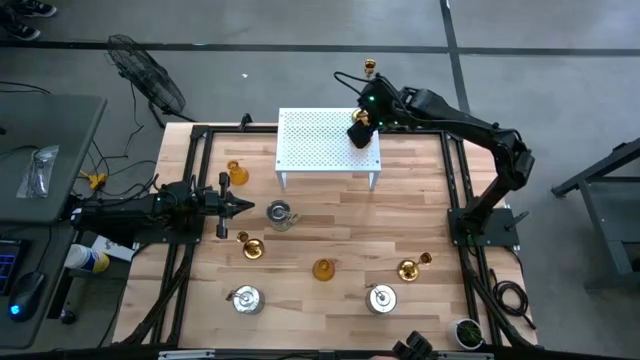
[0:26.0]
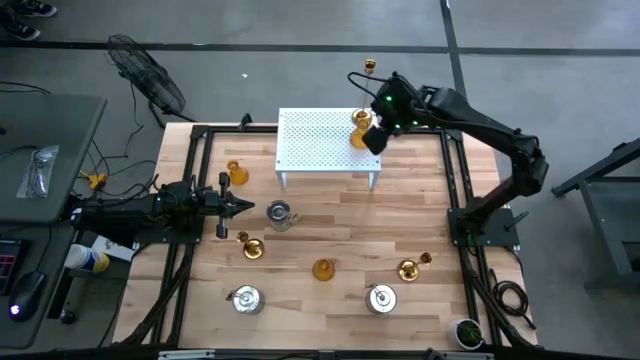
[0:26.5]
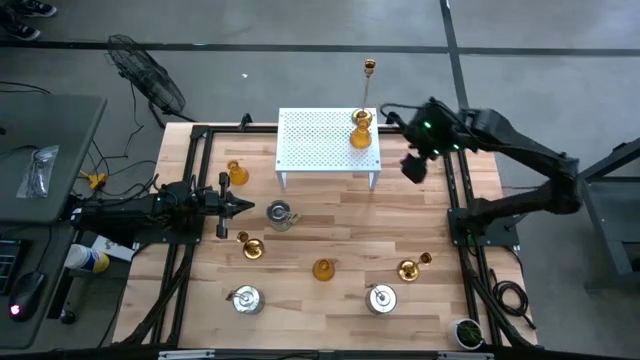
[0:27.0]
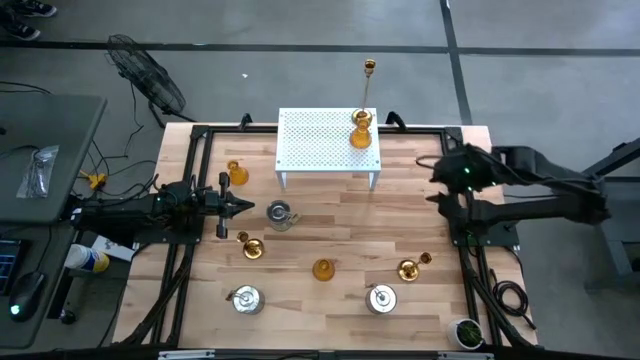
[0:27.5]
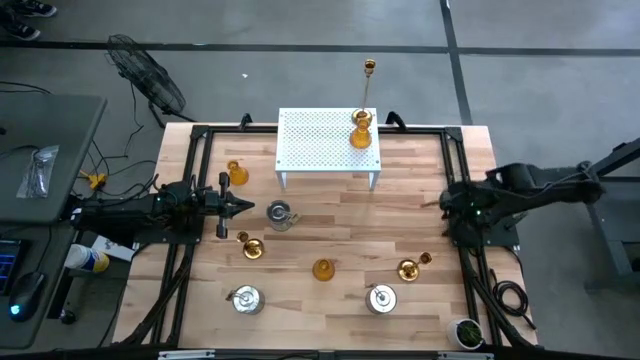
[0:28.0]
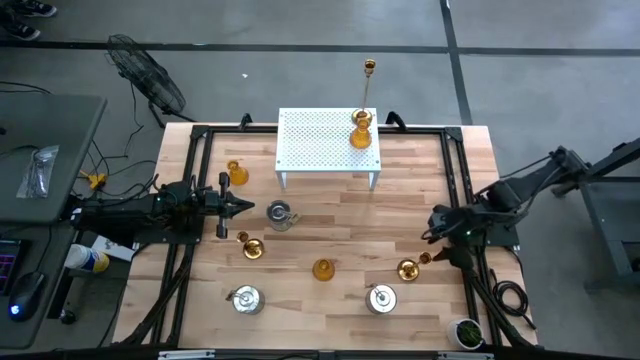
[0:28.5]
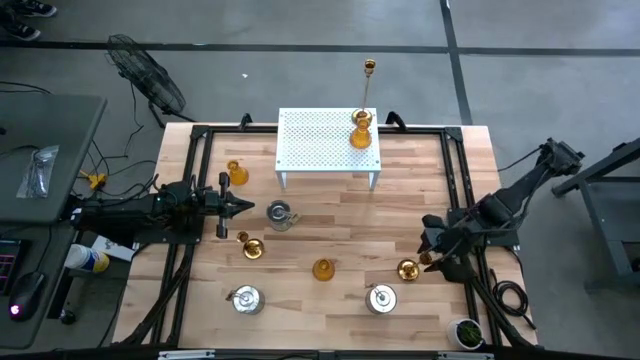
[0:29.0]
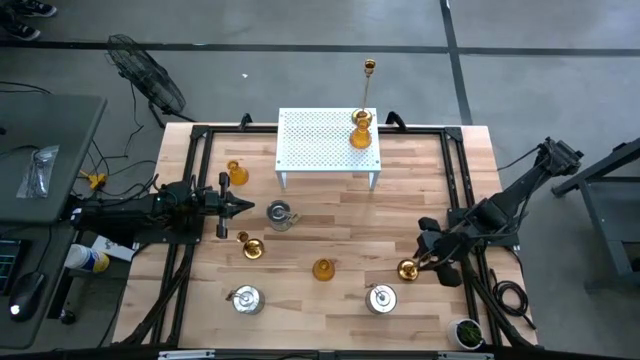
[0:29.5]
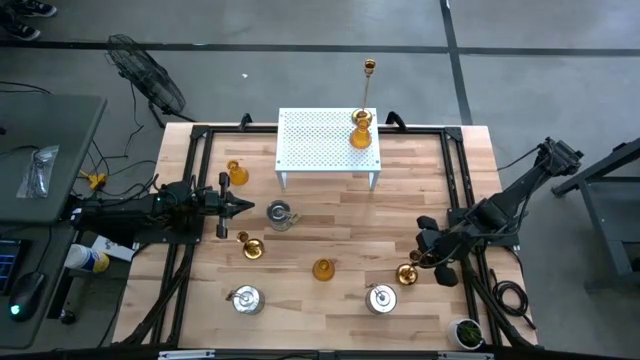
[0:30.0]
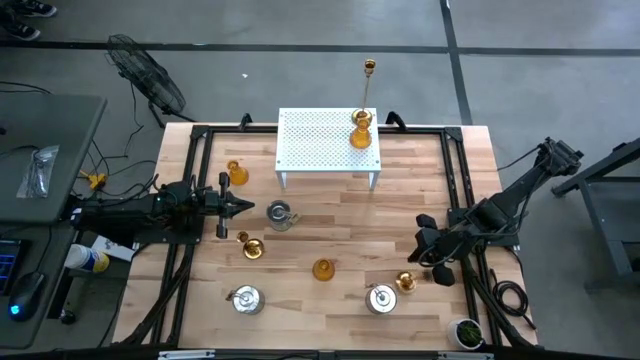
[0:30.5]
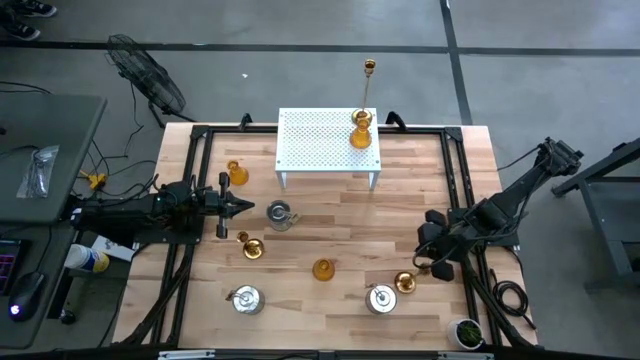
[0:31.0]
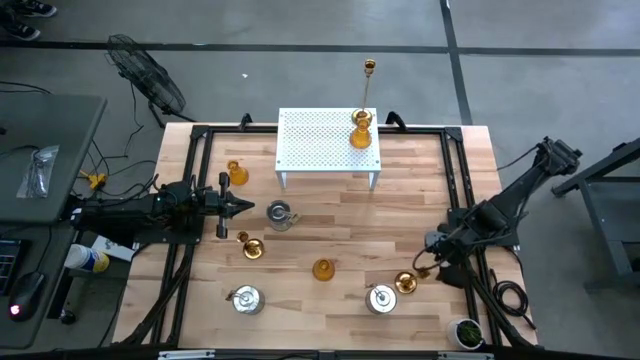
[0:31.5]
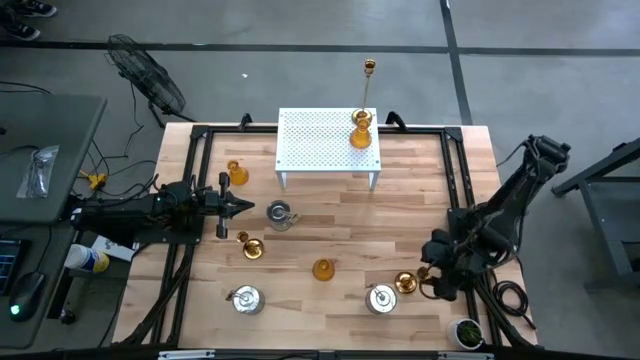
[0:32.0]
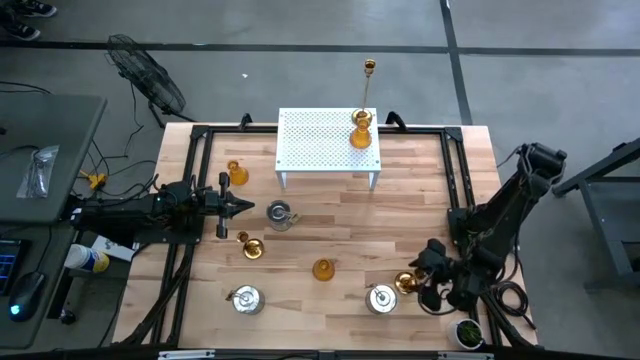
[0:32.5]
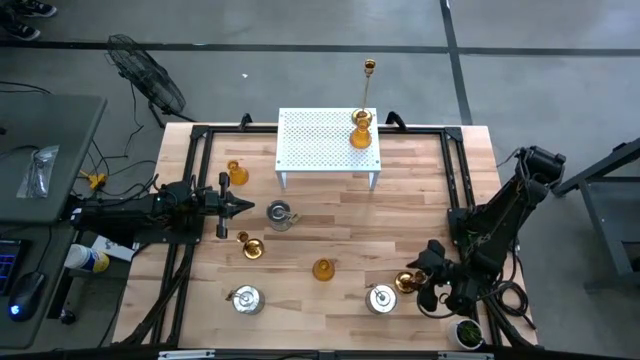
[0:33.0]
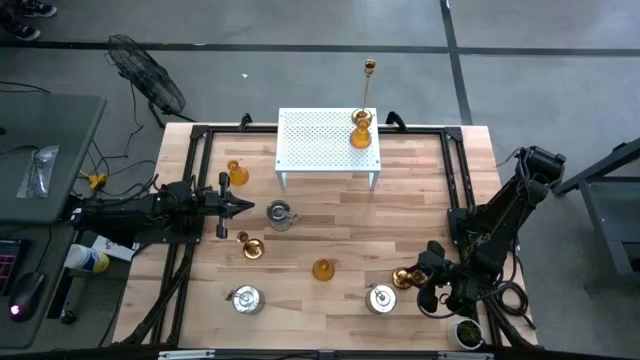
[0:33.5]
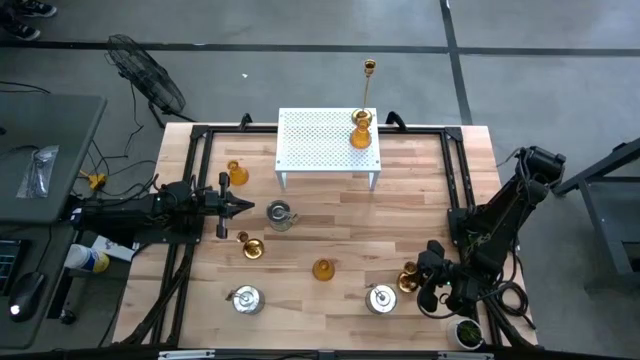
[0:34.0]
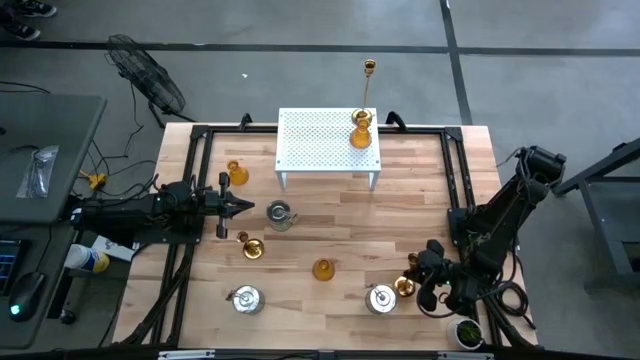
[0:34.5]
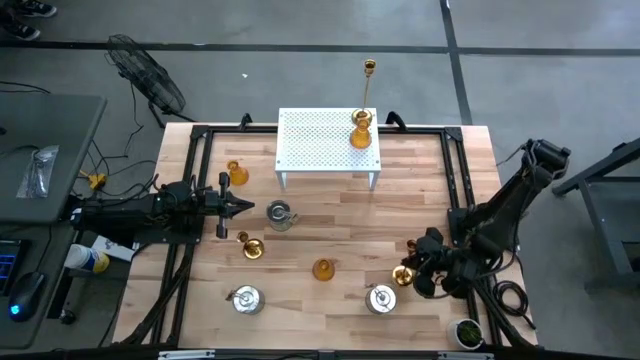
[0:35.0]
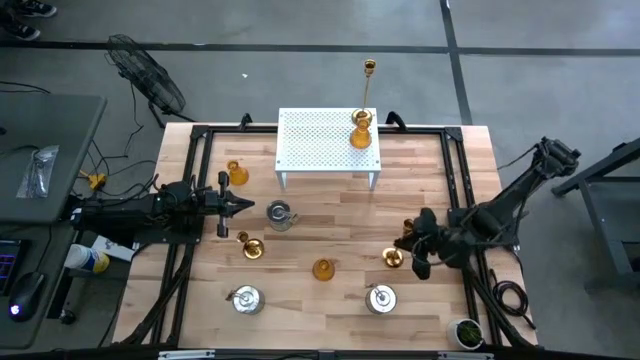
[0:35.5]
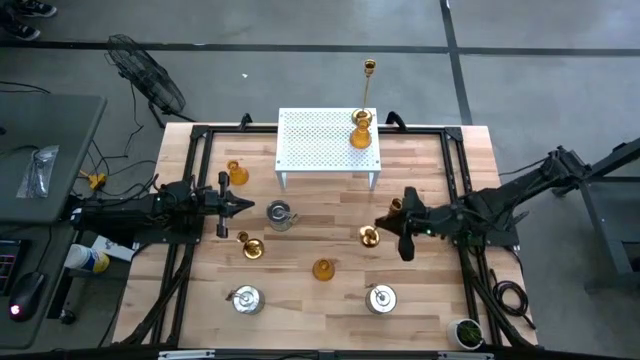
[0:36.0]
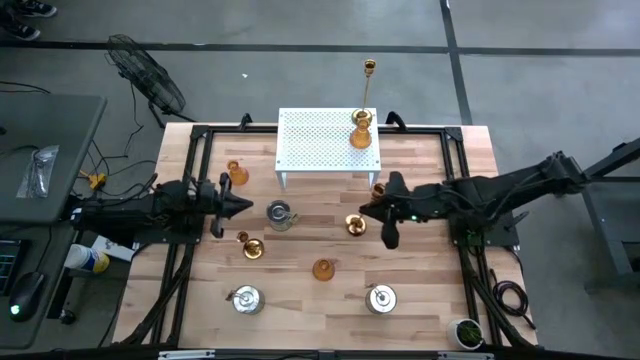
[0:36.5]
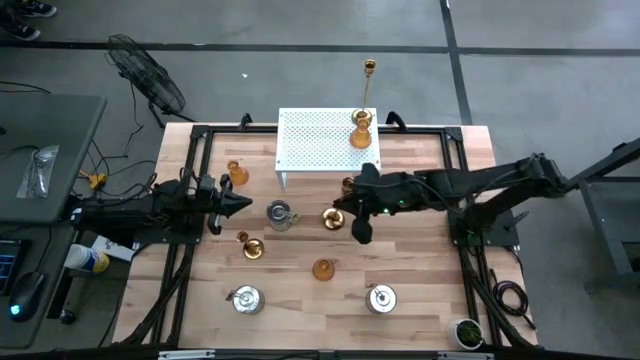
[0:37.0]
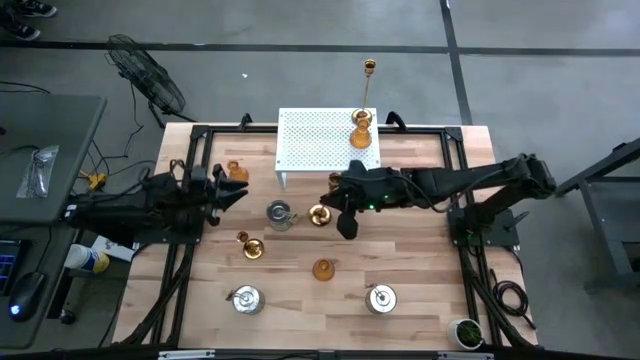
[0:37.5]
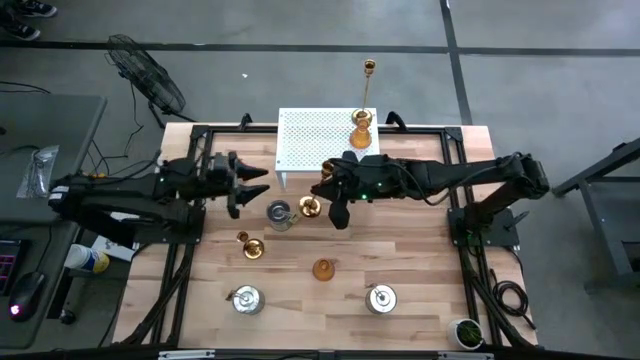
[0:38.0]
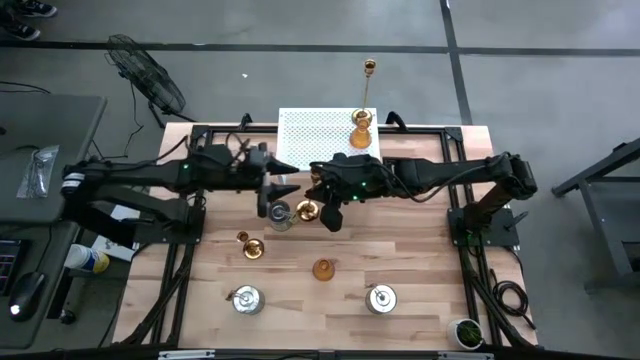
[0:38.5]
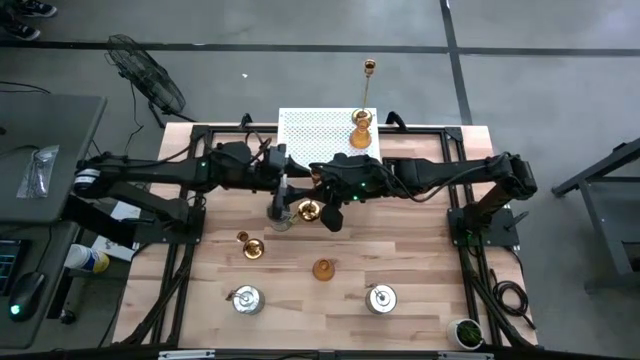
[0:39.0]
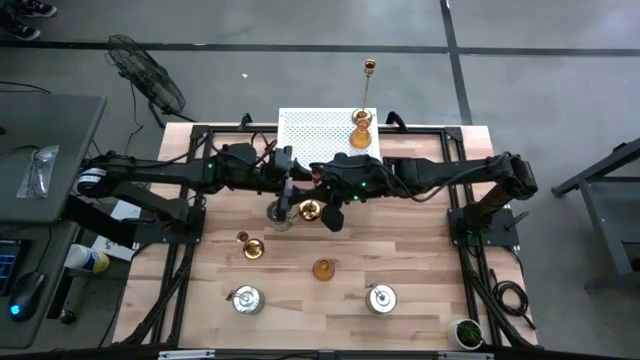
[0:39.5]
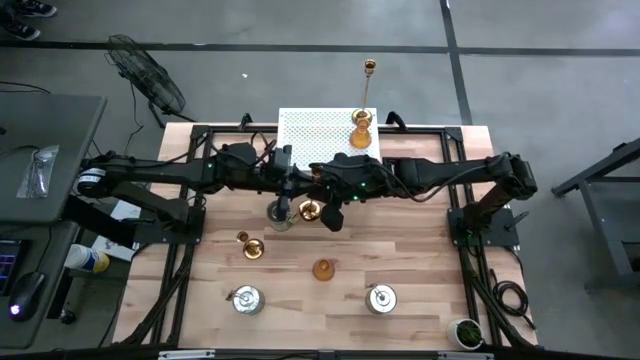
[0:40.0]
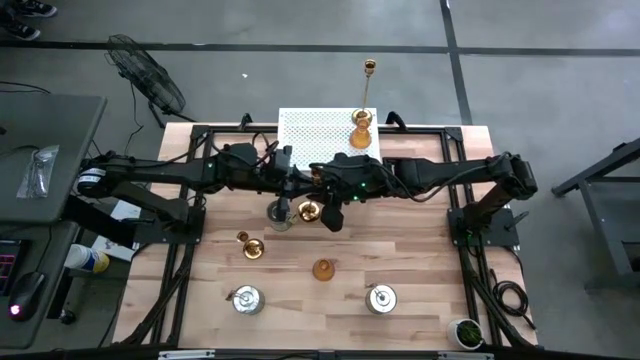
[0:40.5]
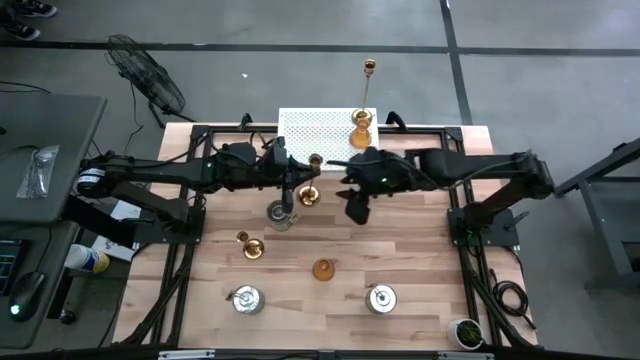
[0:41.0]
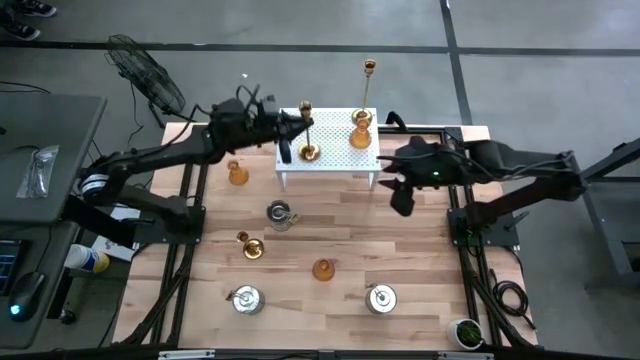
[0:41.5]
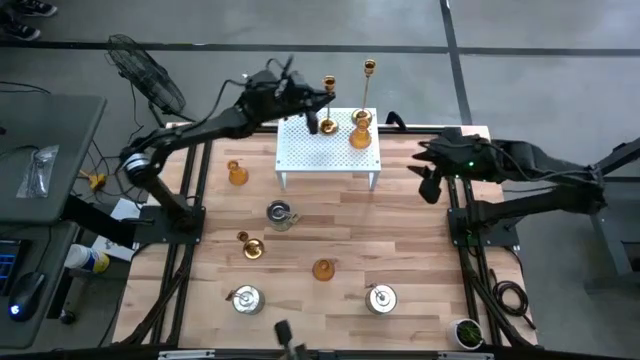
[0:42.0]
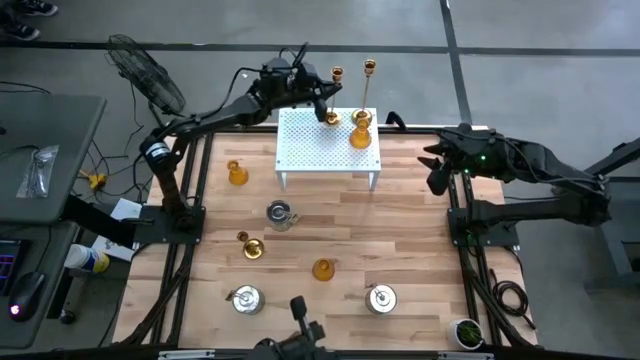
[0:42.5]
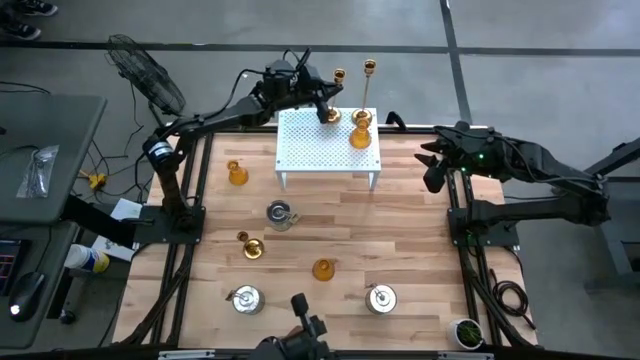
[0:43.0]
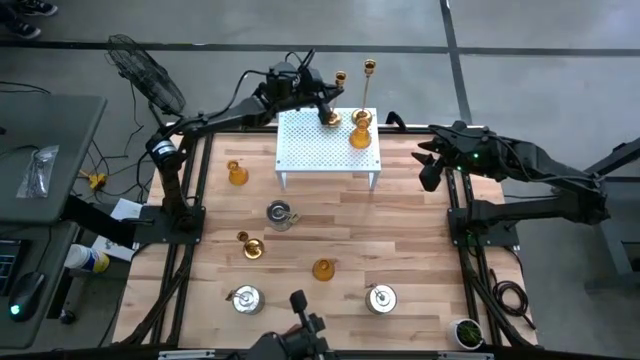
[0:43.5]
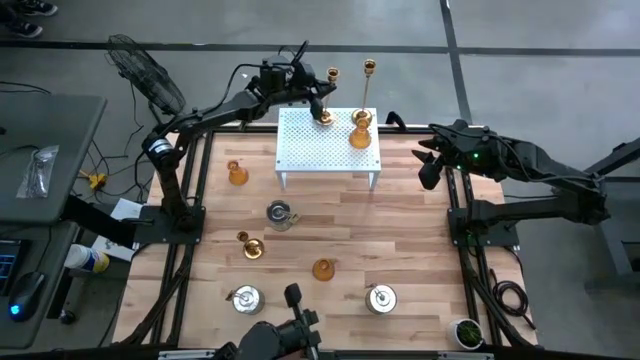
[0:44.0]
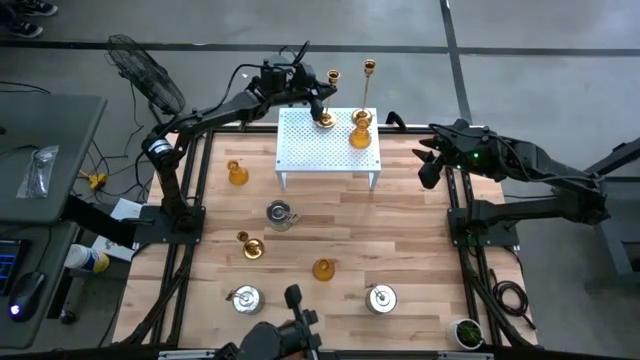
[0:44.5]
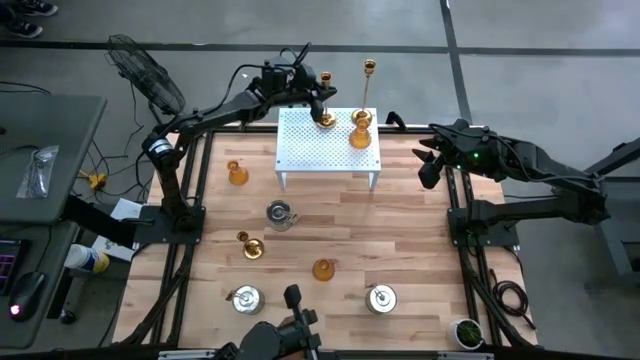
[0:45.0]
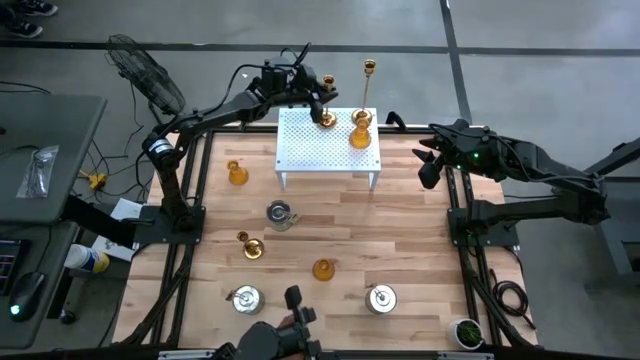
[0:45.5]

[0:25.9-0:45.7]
Task: Pick & Place candle stick holders
Put the right gold candle holder on the shelf aligned with the other gold candle holder

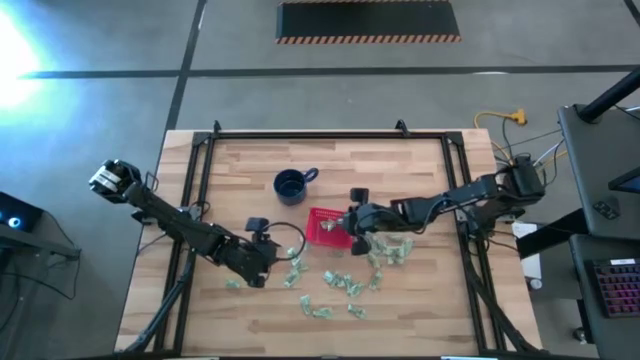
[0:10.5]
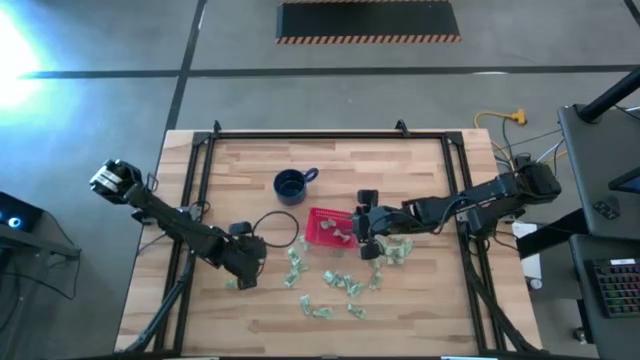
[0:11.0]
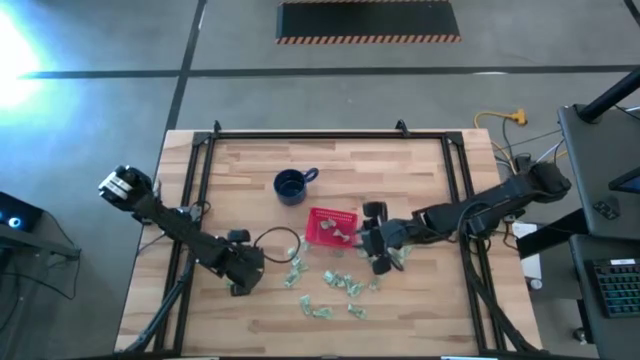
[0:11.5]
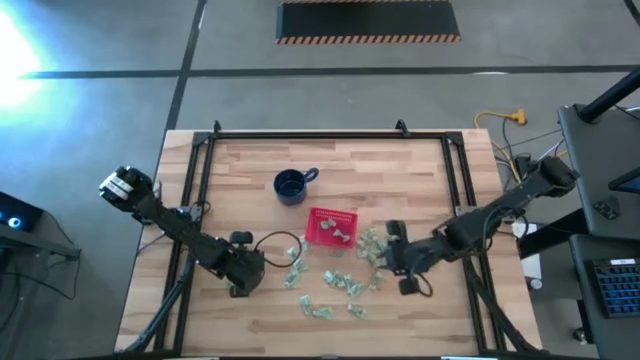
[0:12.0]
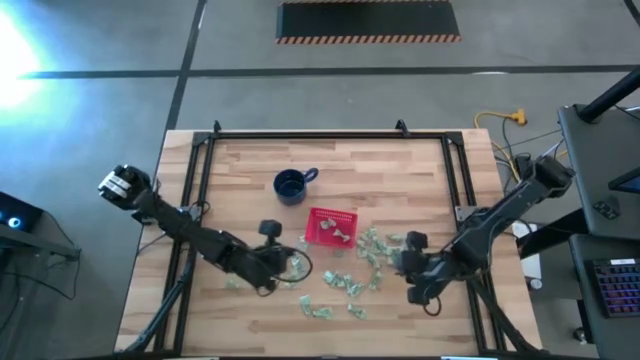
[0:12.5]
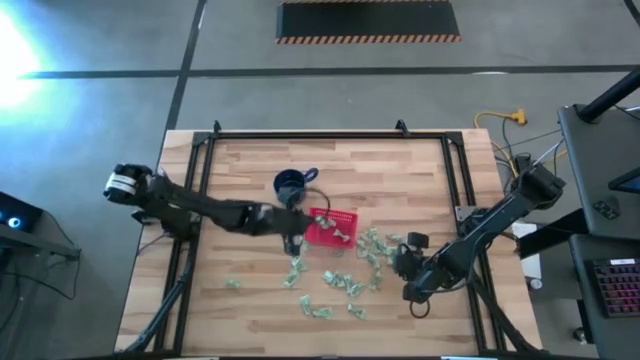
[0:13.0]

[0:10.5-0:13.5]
Task: Pick and place Stevia / Truvia into bins
Put the white stevia packet into the red basket
